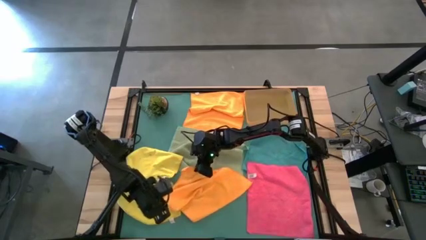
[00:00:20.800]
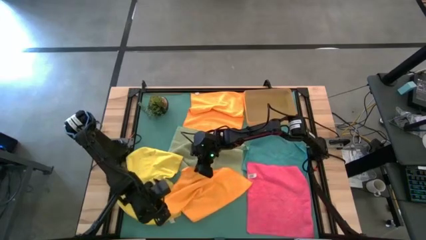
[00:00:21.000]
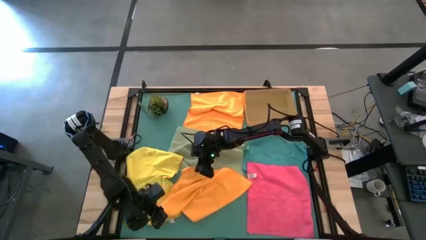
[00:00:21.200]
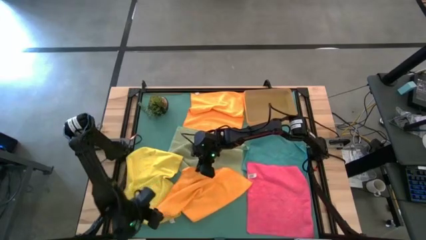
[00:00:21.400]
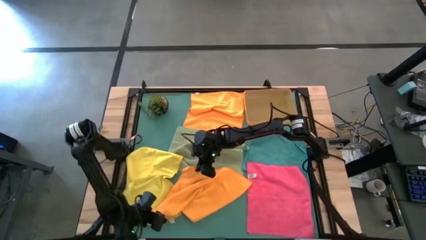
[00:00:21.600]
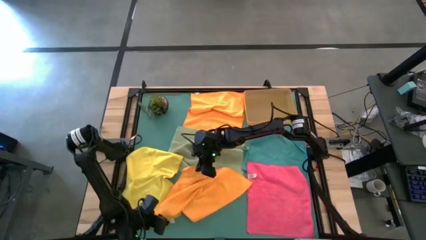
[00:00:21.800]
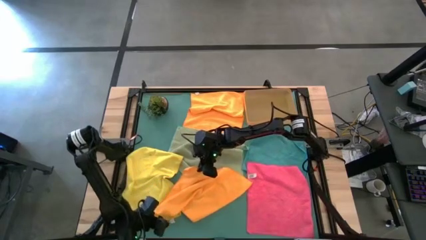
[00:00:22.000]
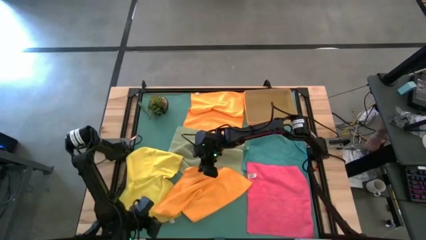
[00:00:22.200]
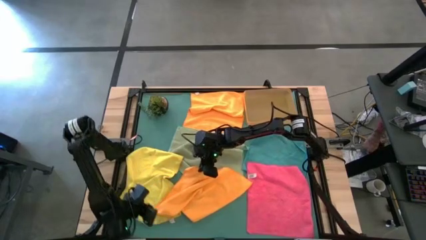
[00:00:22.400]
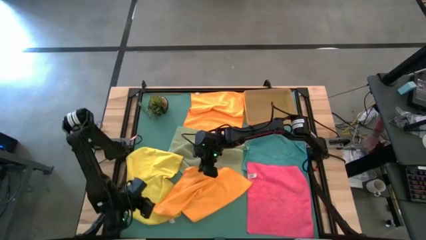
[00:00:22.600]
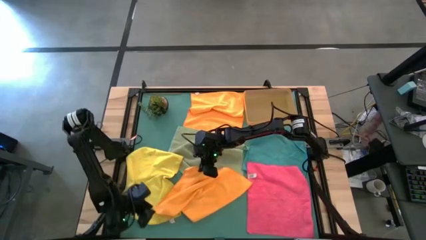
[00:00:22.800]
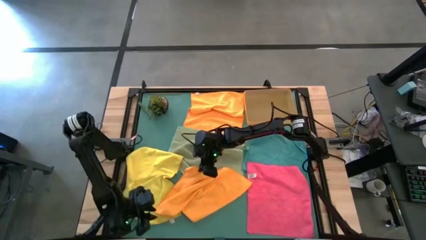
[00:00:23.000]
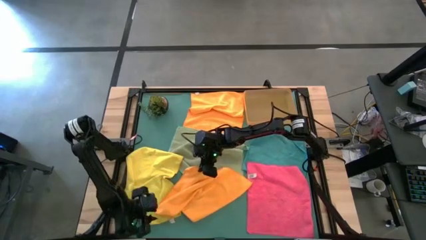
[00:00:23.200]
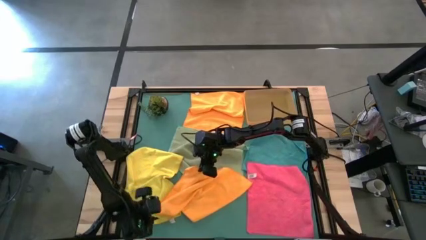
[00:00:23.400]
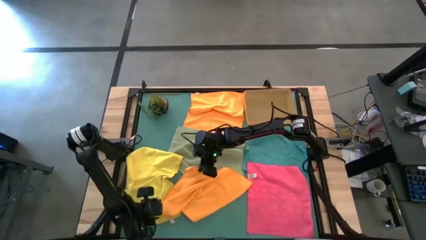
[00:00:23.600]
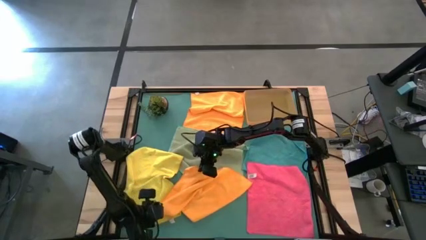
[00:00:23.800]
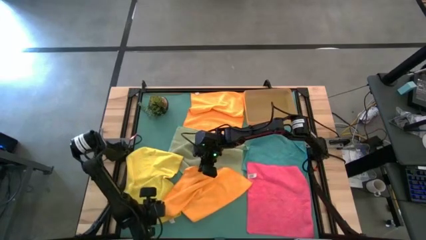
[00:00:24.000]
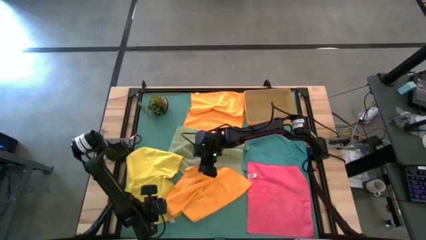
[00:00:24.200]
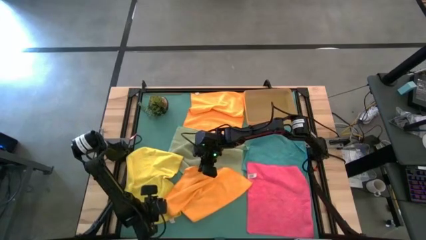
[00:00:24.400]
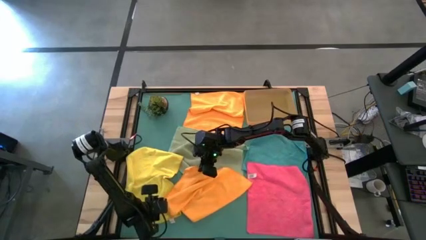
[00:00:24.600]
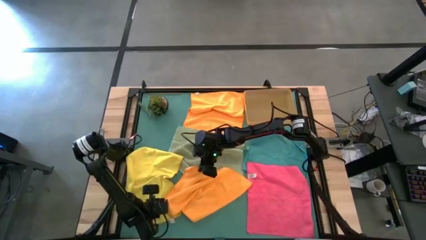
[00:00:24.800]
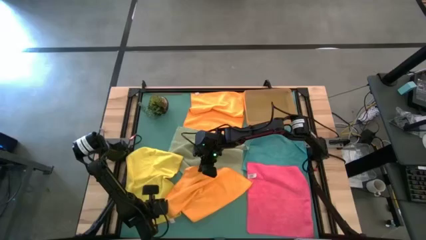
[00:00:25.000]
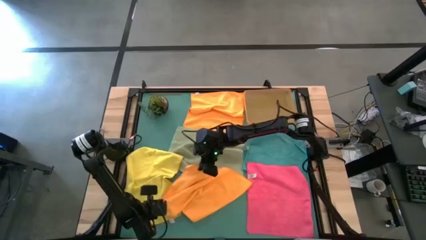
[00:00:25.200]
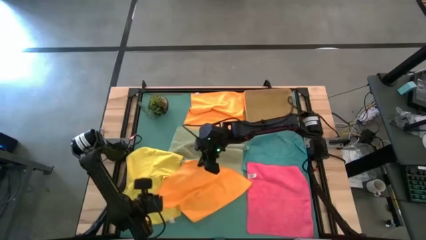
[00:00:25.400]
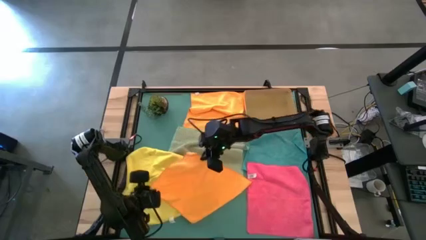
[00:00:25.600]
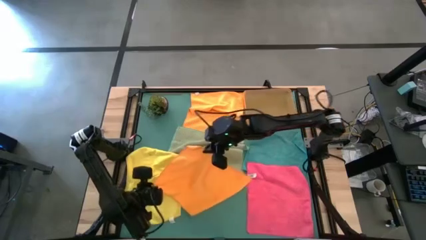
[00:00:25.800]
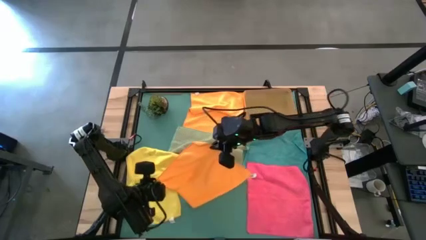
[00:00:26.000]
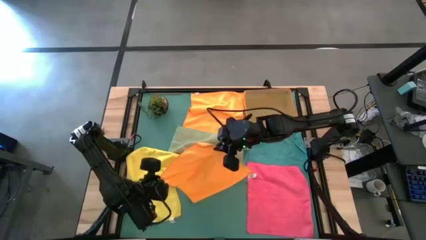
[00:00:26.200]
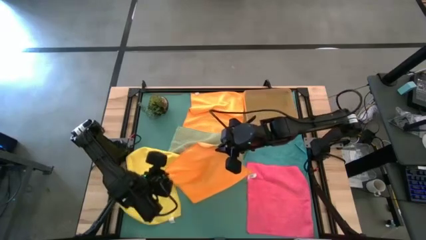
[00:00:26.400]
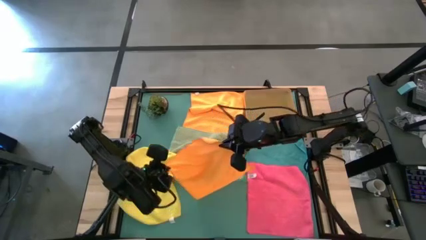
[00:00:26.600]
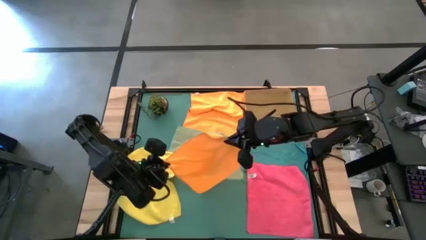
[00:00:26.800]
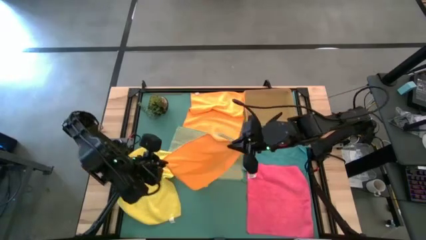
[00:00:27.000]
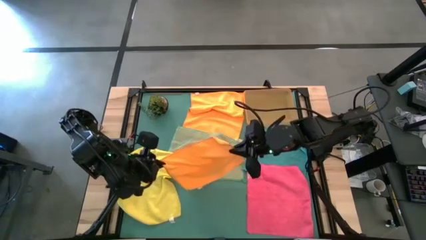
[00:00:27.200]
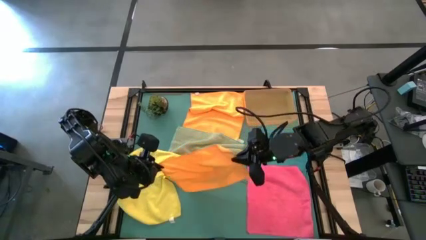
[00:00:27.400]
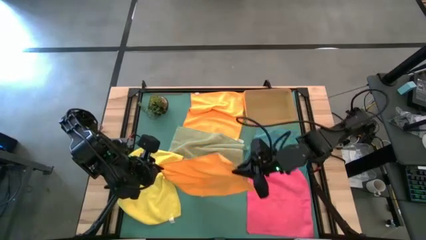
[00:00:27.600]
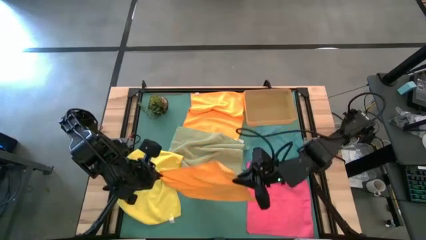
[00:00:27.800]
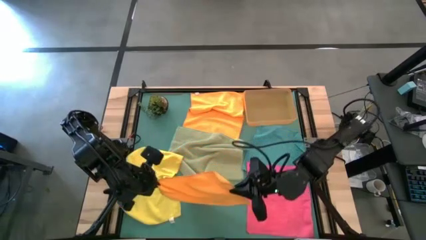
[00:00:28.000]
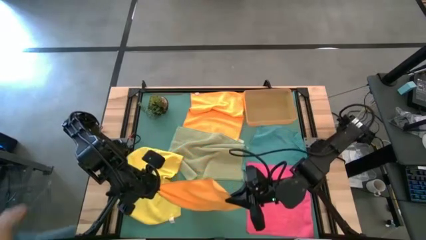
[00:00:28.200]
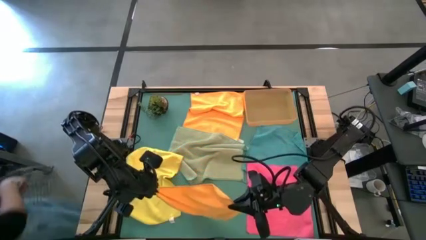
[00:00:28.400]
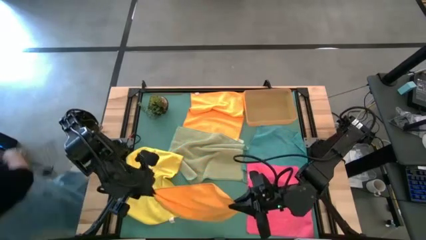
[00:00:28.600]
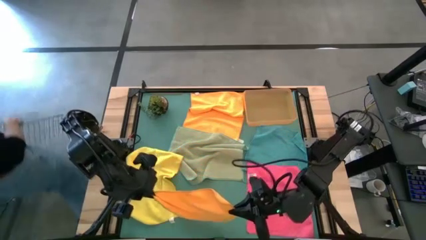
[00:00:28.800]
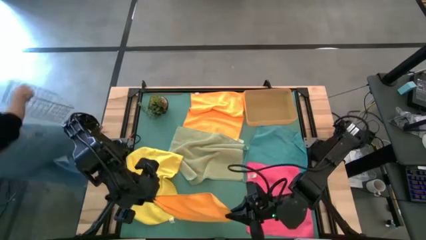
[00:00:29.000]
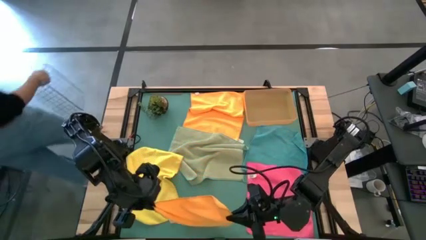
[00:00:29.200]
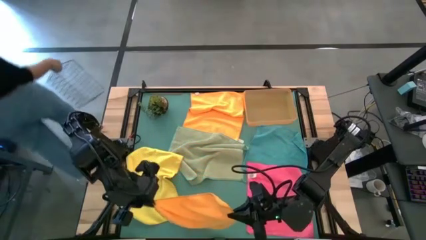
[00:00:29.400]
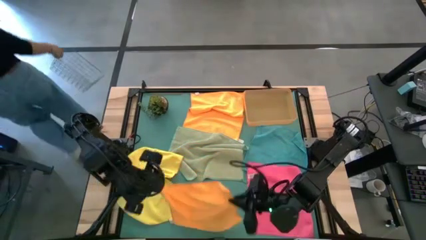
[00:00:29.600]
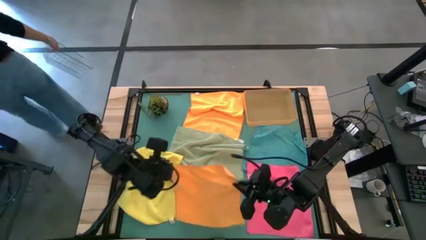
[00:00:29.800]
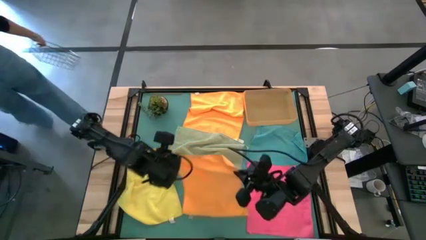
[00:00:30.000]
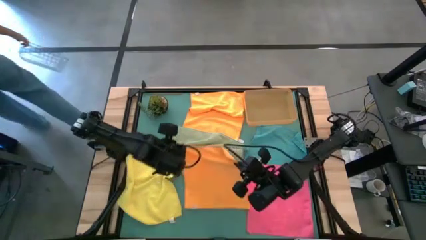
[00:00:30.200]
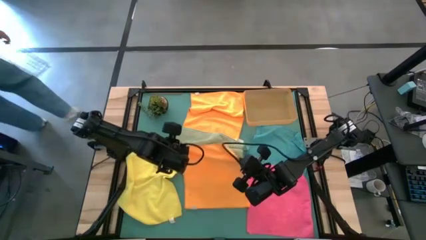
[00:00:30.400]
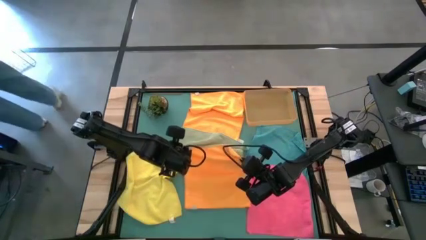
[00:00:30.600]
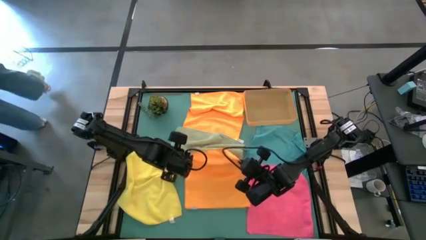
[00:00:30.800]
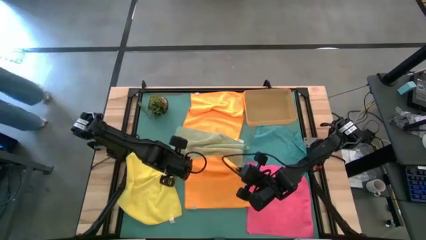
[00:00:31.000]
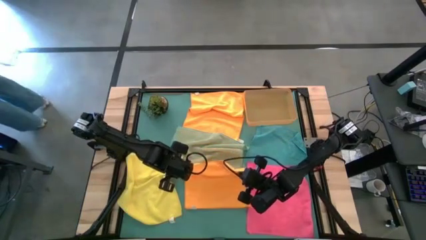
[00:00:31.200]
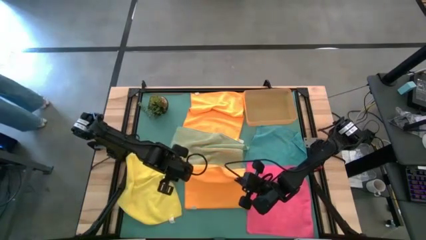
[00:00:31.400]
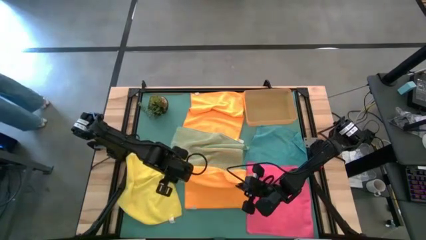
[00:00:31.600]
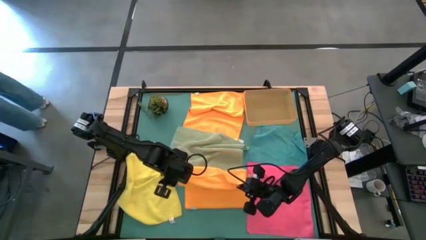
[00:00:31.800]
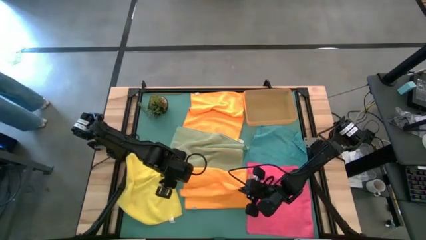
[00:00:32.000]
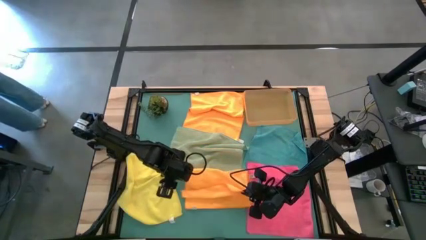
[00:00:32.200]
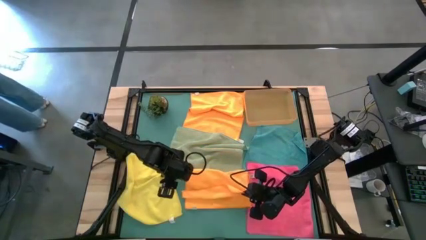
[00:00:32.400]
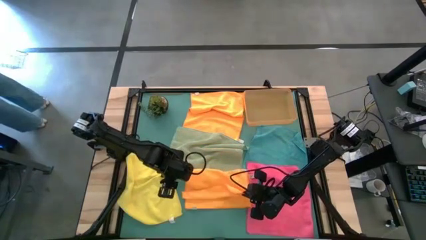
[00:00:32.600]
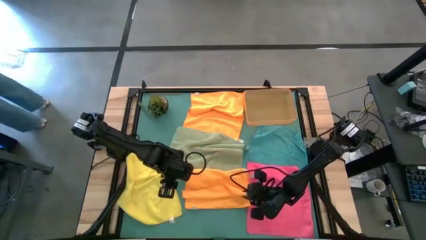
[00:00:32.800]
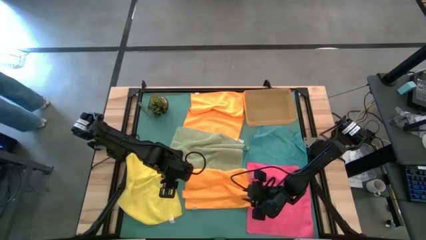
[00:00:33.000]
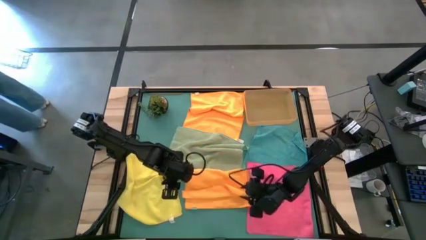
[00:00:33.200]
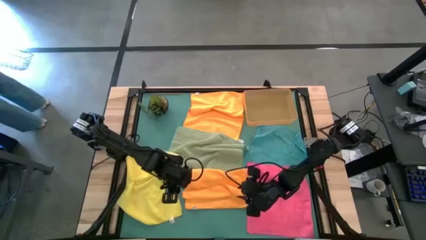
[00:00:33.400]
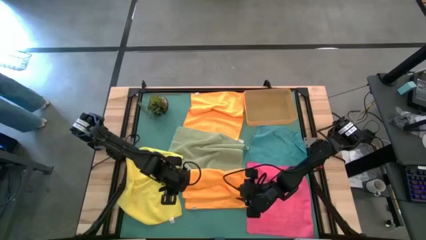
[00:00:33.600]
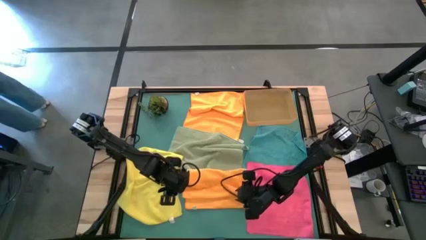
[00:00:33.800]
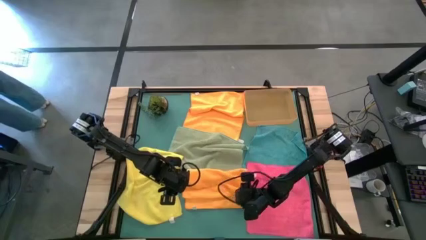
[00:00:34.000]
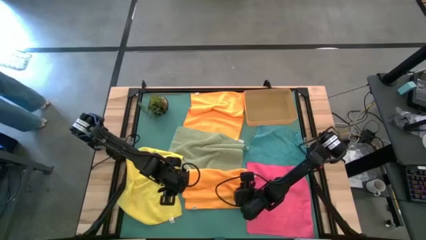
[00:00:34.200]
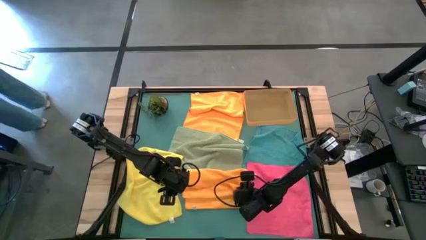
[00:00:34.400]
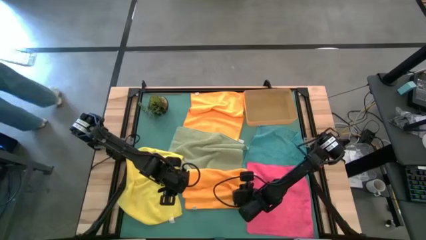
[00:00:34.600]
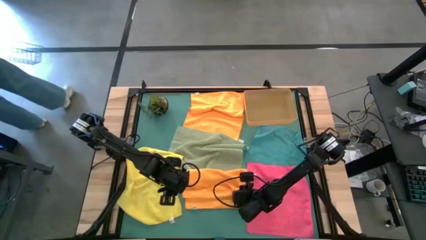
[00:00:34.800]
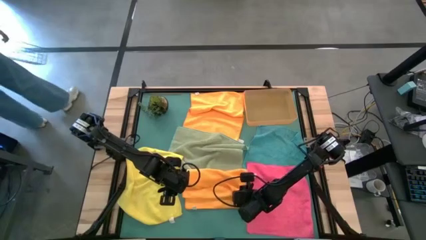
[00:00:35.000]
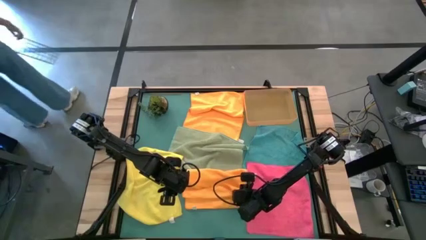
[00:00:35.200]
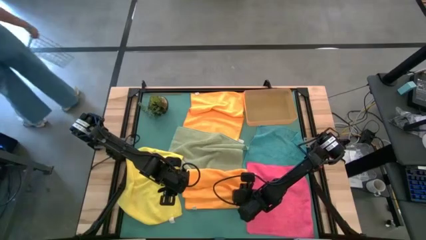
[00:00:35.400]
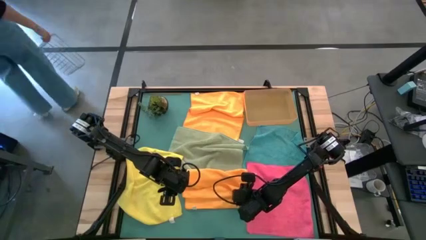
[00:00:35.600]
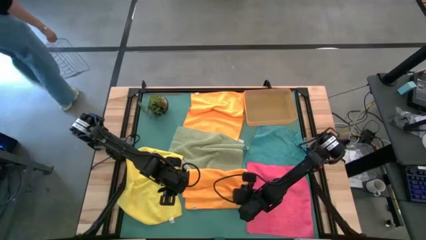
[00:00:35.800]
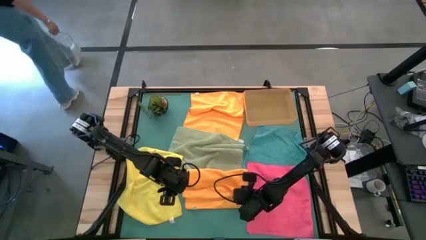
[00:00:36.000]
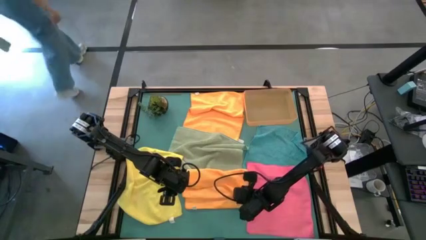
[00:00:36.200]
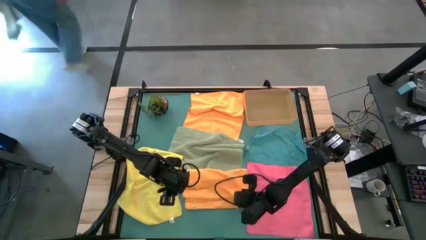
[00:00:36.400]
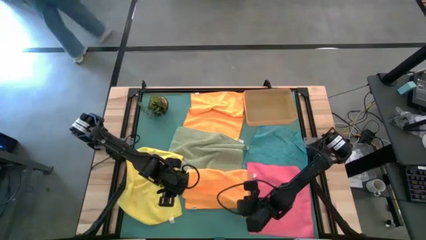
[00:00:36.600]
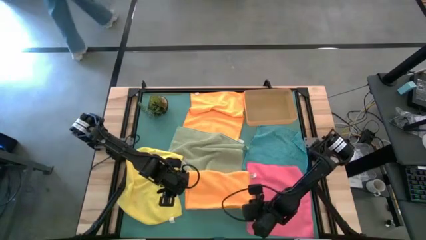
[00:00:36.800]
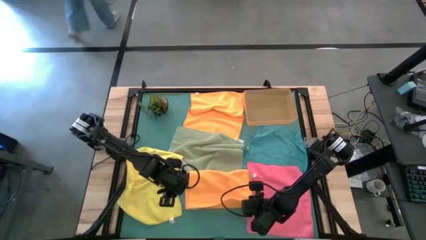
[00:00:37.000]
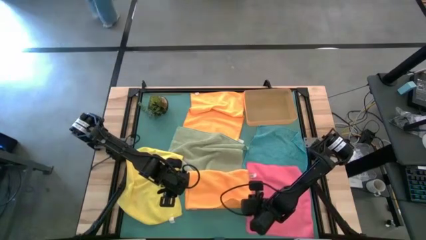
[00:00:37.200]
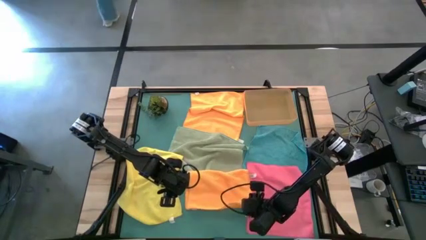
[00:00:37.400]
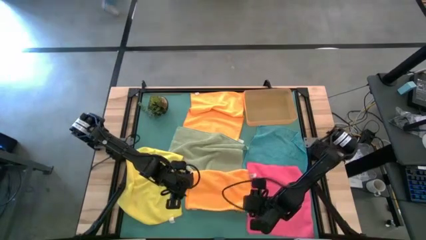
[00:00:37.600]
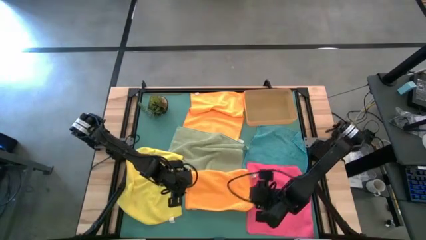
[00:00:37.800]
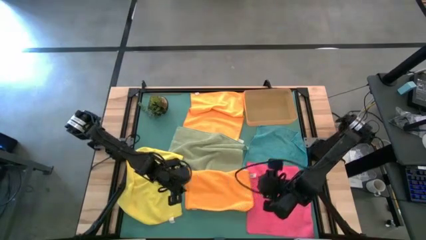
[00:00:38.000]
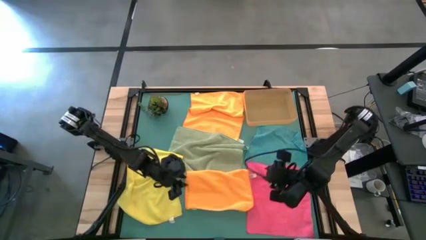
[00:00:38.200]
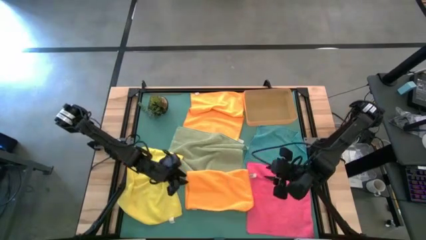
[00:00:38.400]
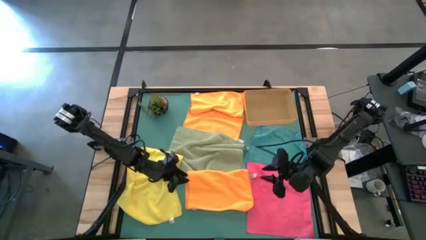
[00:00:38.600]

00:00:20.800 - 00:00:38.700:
Task: Fold microfiber towels
Fold the bottom orange towel
